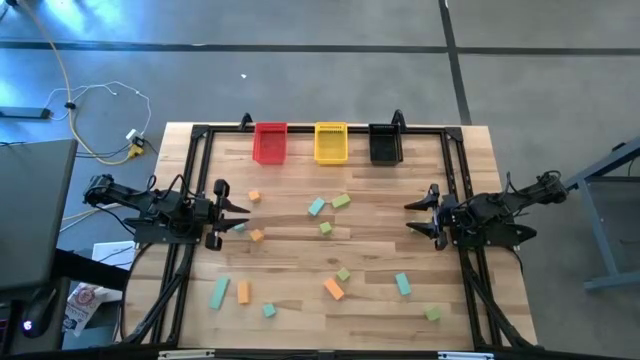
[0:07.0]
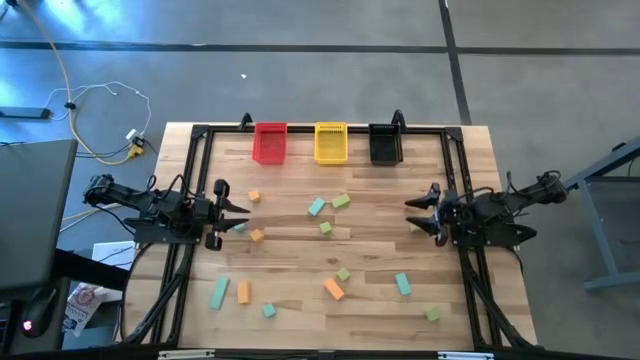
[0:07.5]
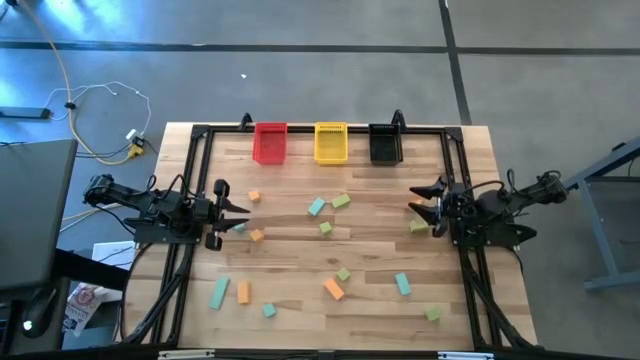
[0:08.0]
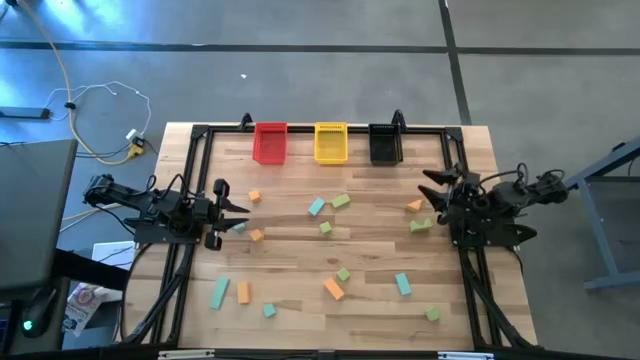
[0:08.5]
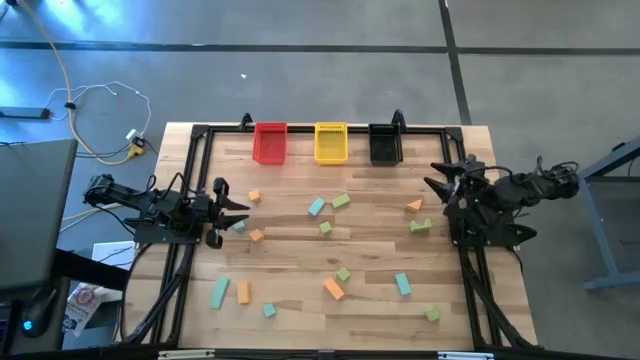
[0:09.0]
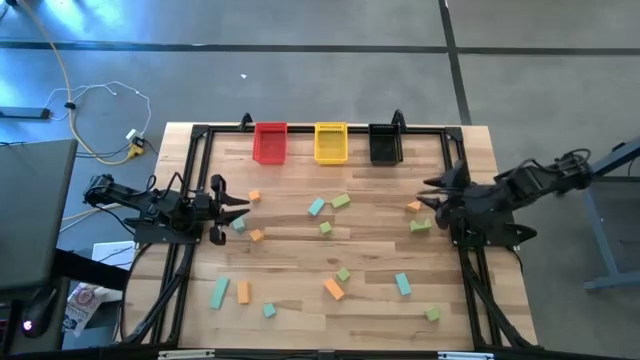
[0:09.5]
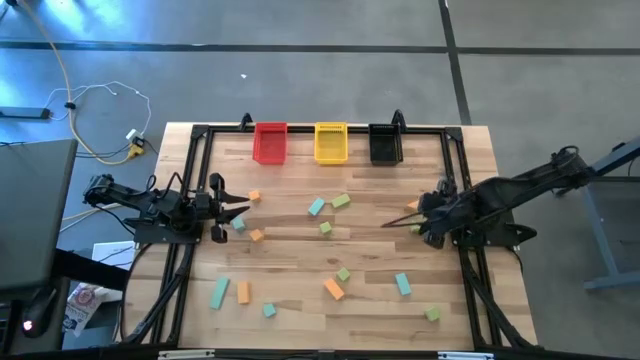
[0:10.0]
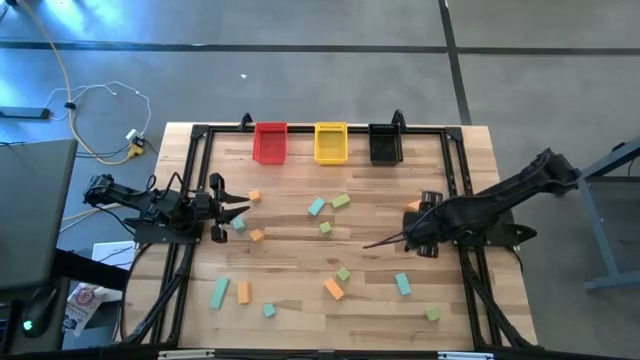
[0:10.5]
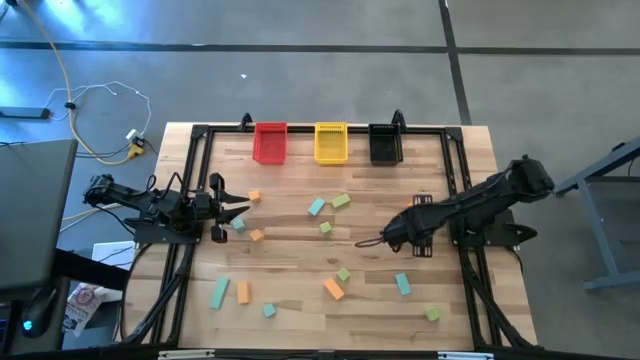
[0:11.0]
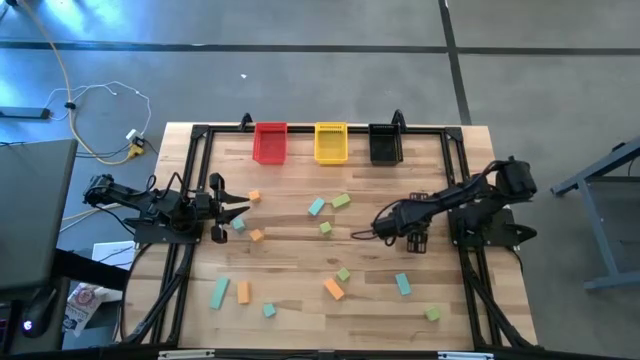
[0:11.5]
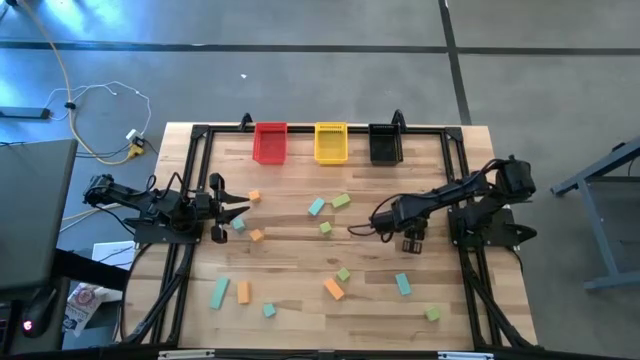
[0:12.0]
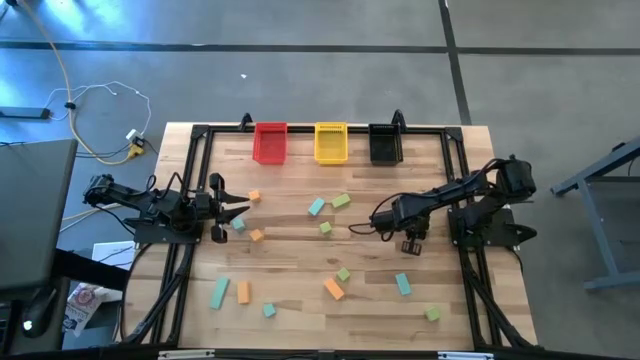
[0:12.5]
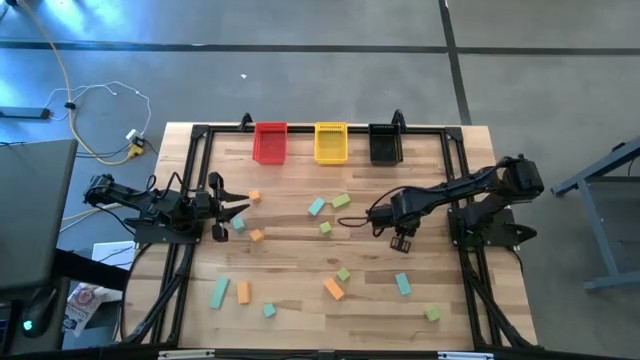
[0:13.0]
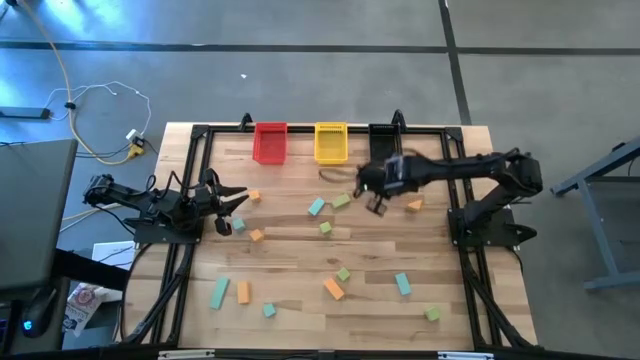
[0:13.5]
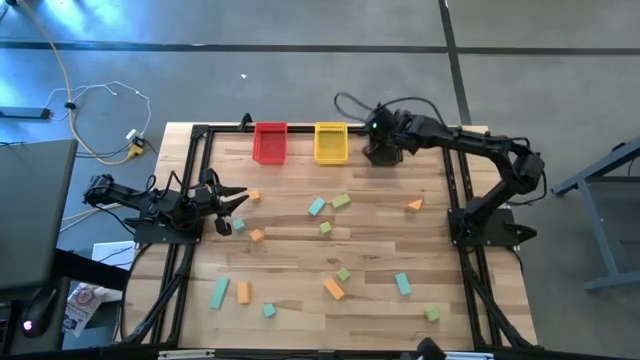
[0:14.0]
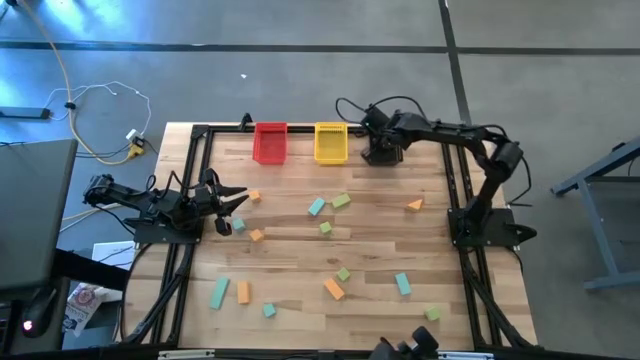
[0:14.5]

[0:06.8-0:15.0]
Task: Sort & place blocks by color
Put the green block into the black bin

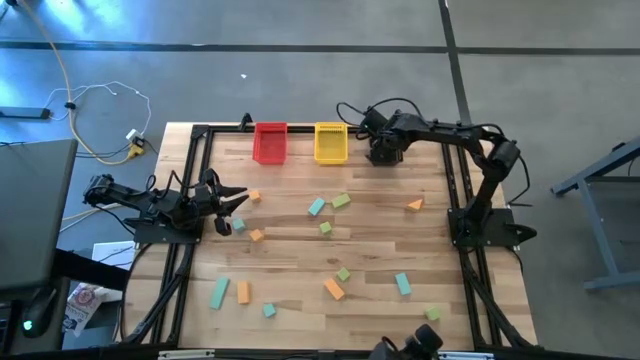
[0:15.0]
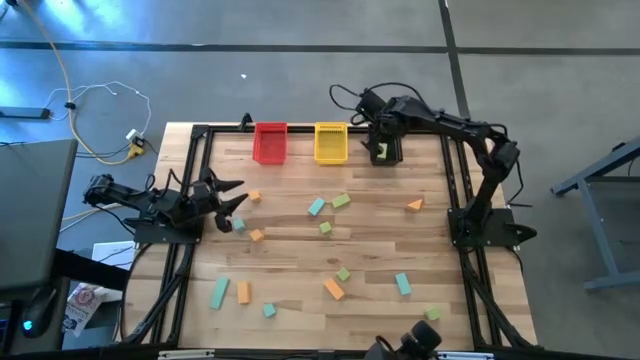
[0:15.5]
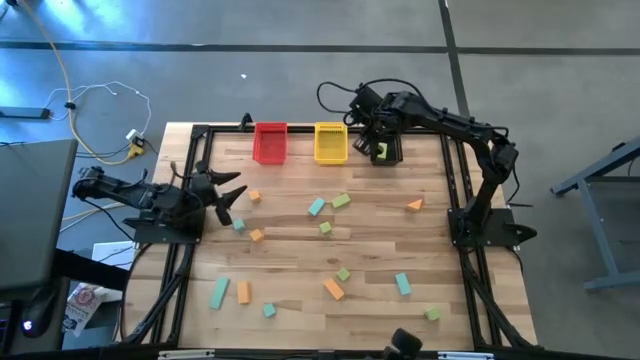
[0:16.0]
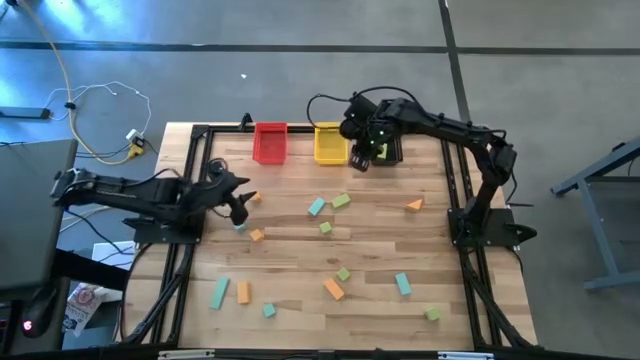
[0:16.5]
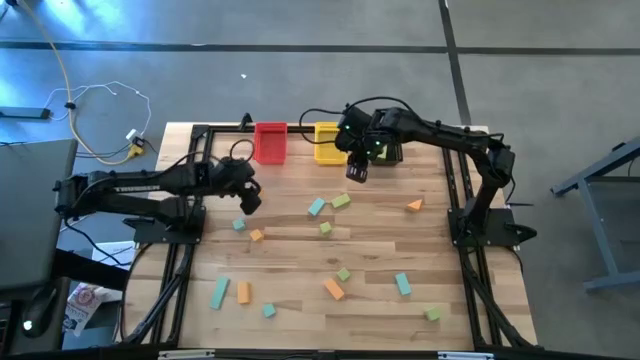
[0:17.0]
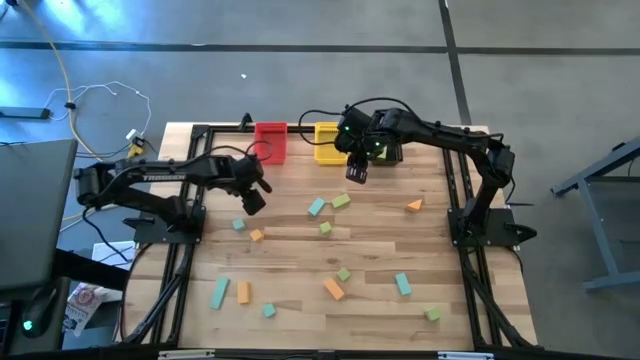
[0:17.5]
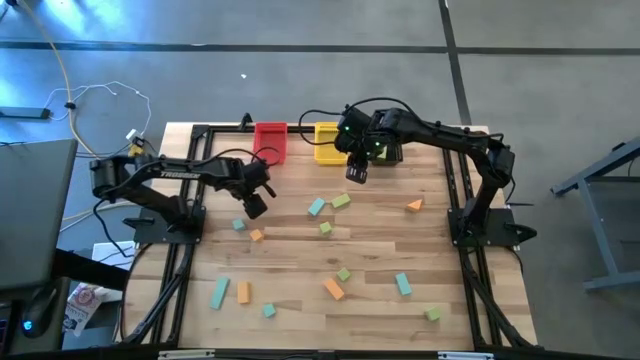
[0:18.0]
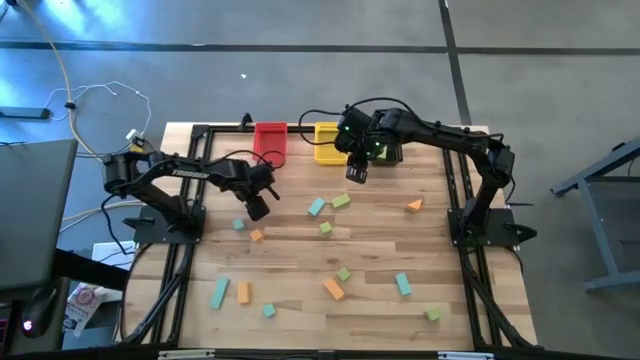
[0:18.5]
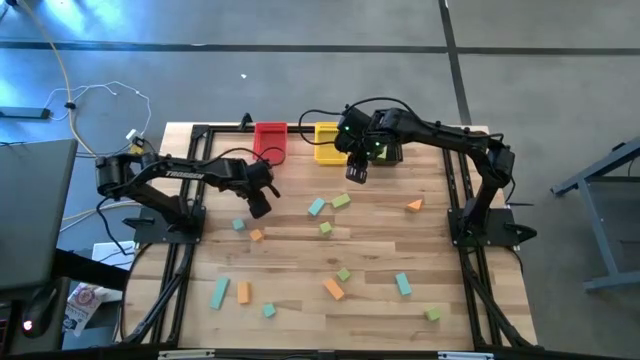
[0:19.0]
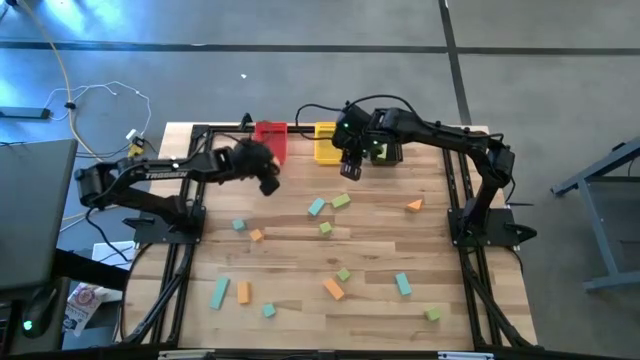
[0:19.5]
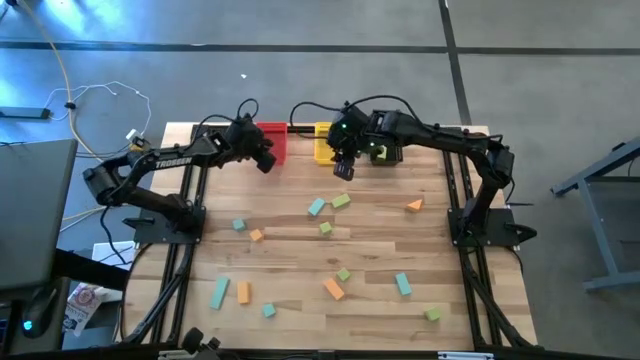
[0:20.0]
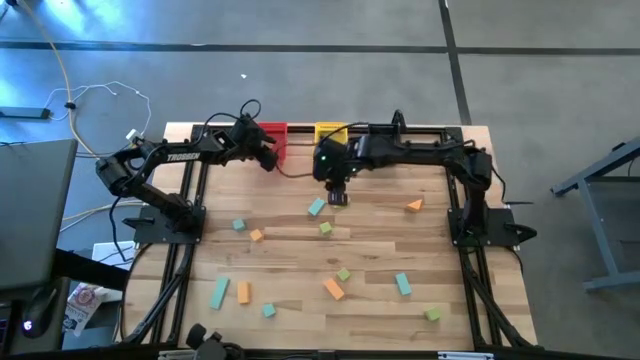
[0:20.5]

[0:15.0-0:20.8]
Put the orange block into the red bin

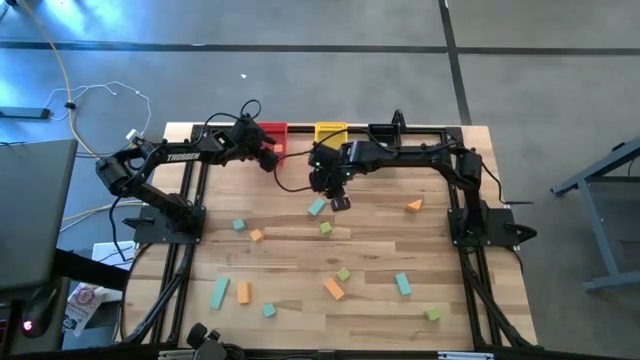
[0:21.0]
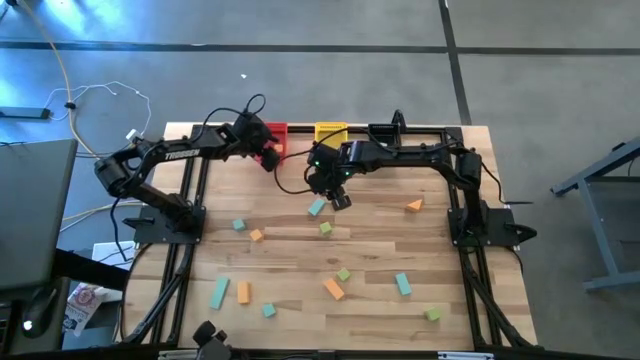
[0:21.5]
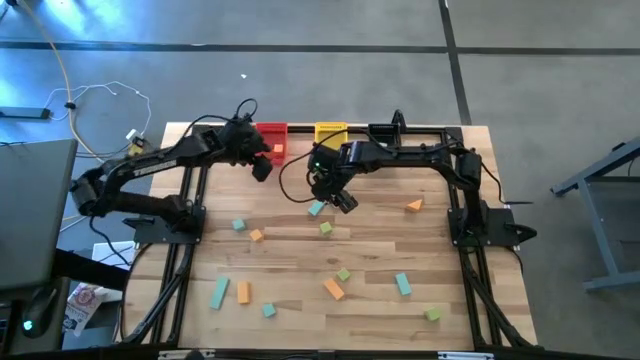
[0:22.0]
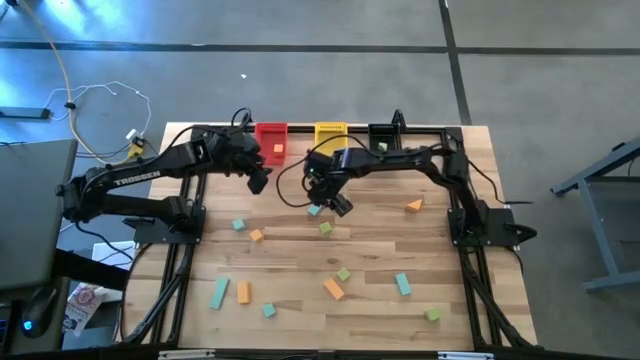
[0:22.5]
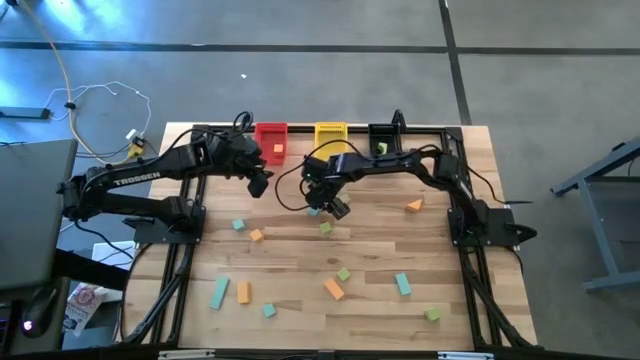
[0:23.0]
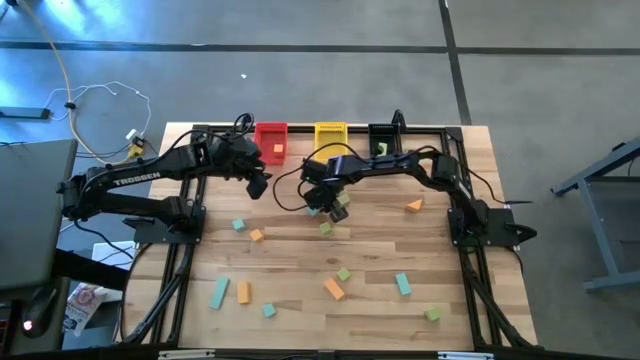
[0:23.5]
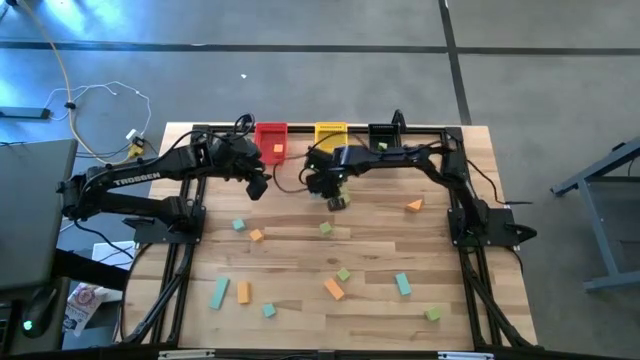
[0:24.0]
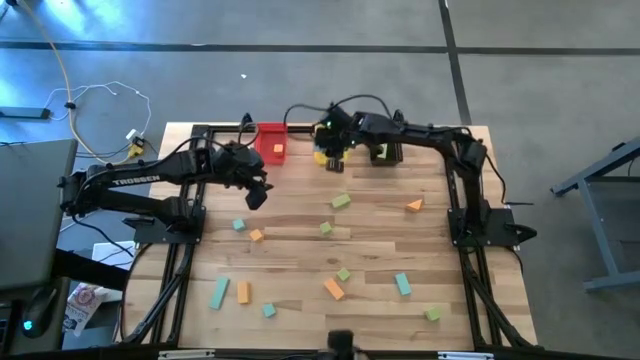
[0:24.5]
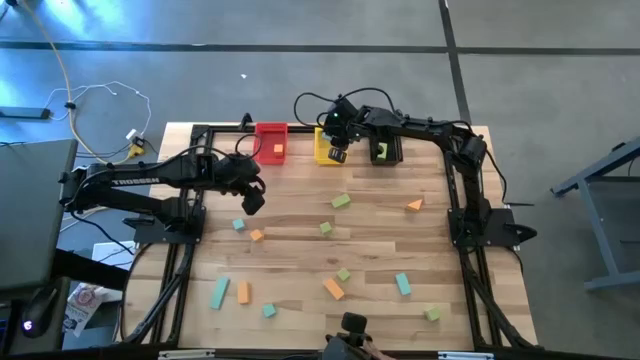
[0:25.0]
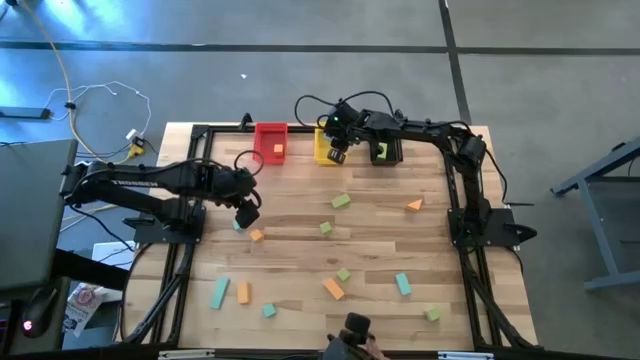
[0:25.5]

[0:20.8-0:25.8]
Put the blue block into the yellow bin

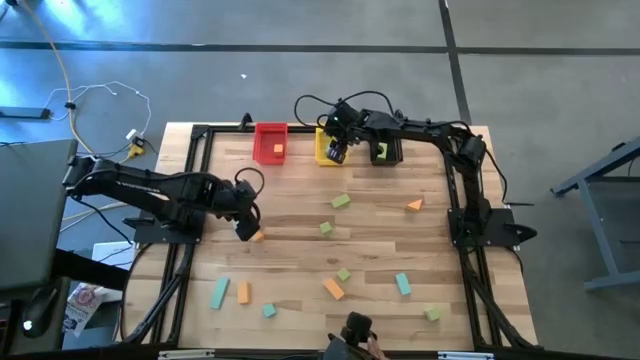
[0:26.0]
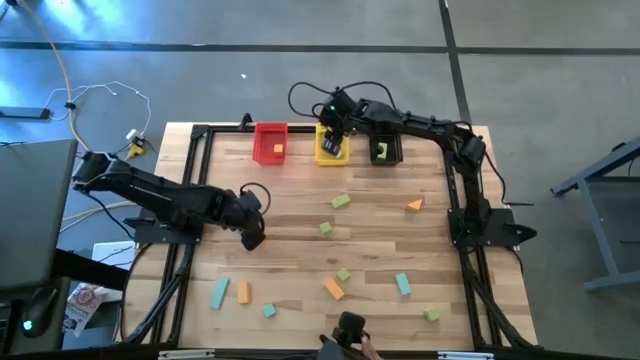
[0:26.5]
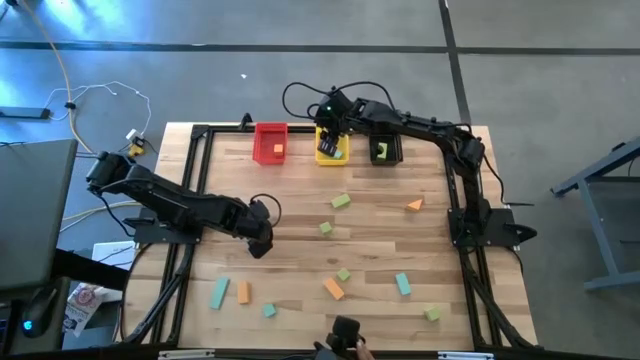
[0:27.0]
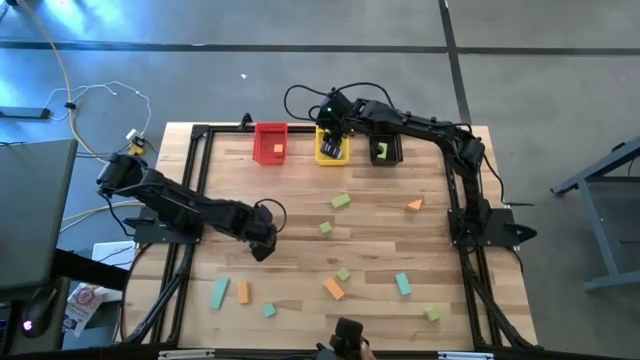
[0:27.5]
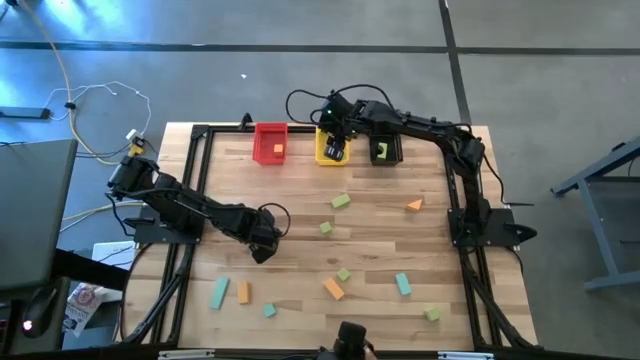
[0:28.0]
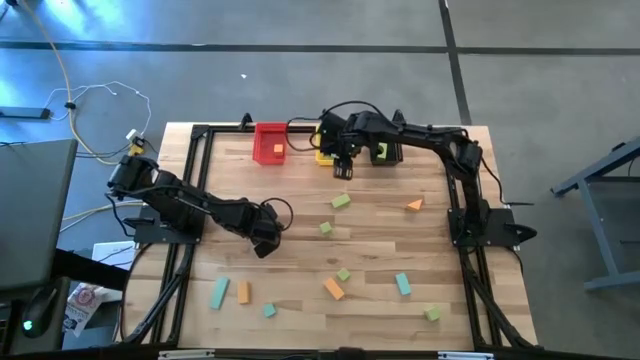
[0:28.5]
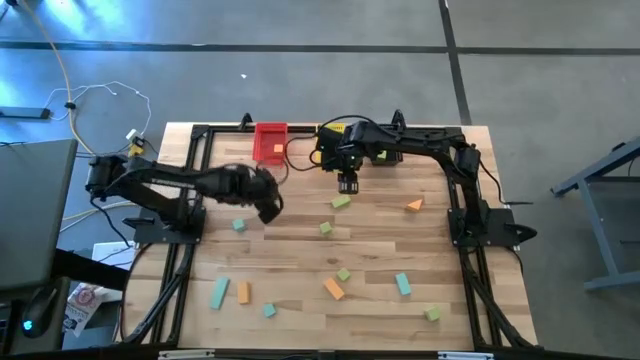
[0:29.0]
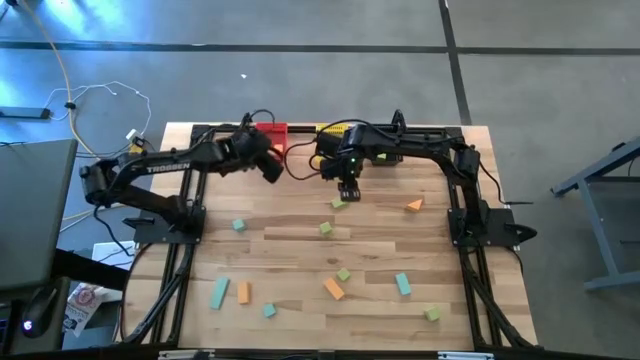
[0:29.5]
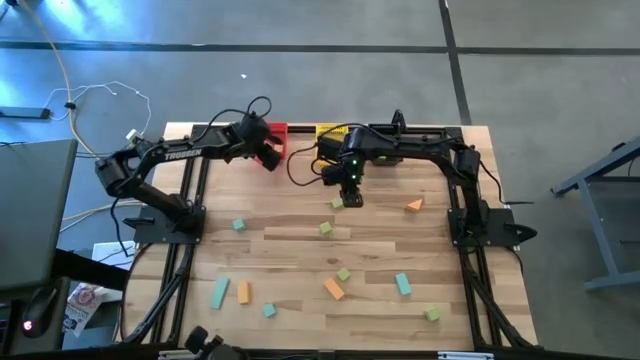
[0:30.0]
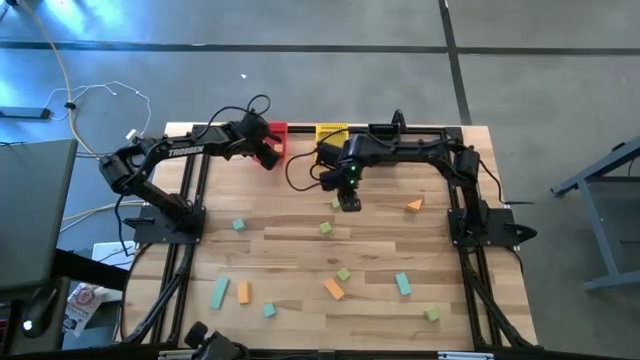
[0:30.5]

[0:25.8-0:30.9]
Put the orange block into the red bin
